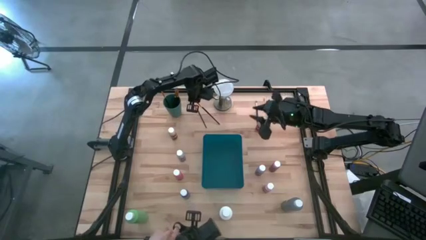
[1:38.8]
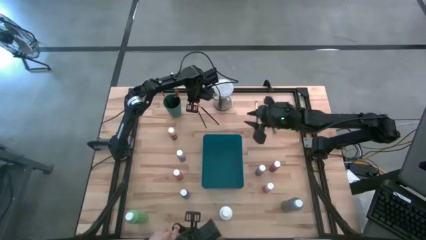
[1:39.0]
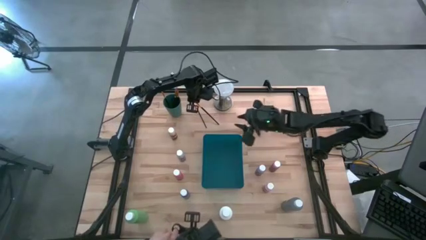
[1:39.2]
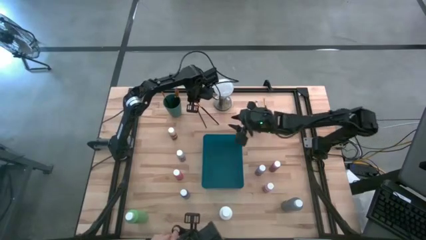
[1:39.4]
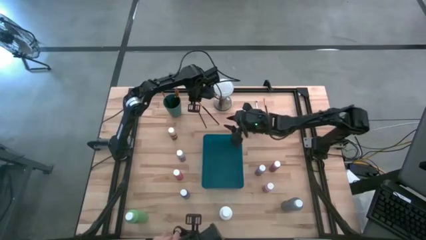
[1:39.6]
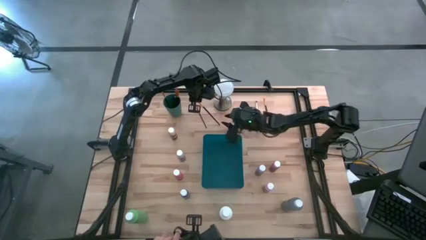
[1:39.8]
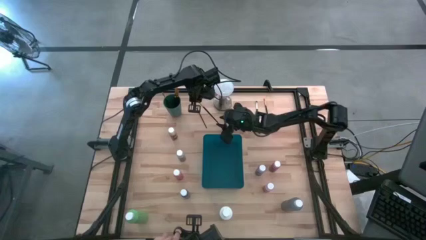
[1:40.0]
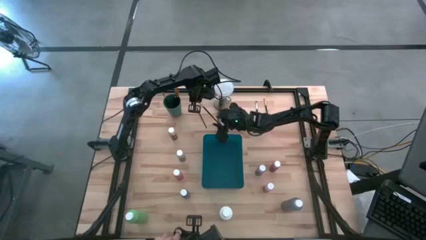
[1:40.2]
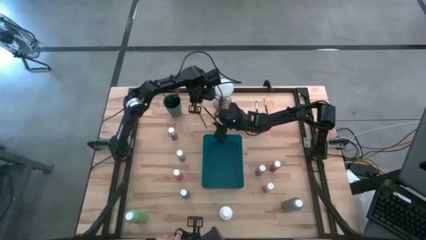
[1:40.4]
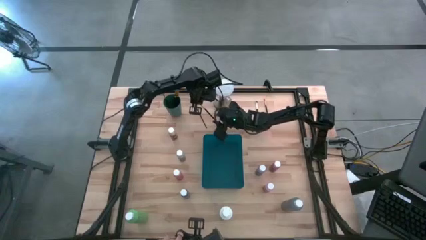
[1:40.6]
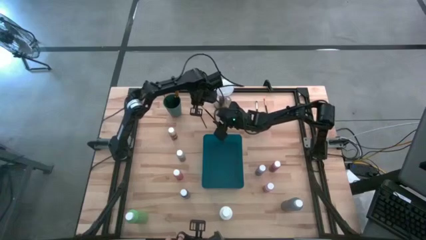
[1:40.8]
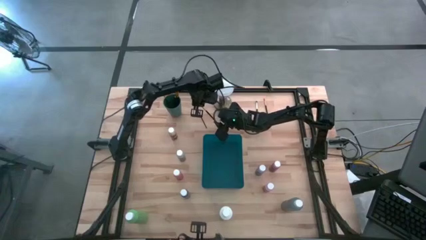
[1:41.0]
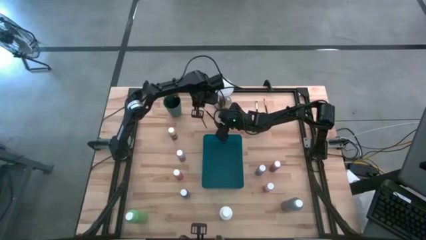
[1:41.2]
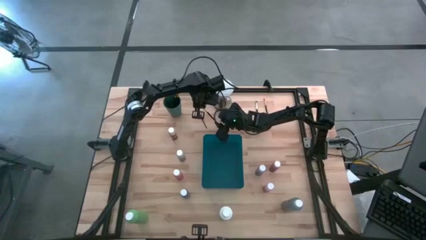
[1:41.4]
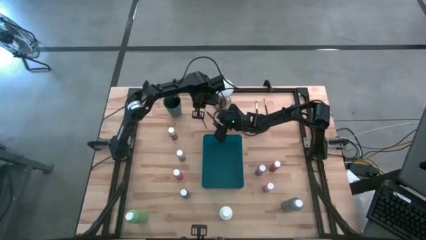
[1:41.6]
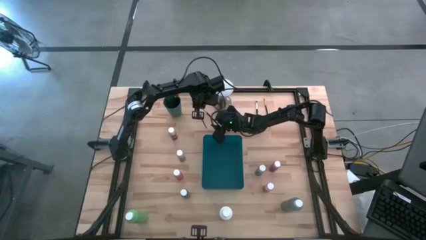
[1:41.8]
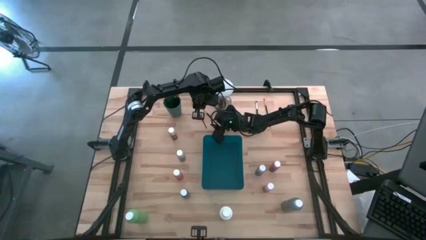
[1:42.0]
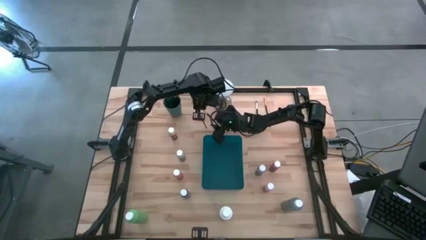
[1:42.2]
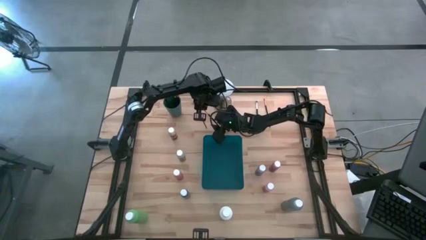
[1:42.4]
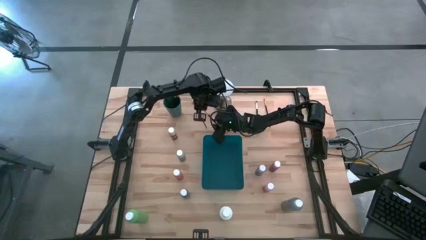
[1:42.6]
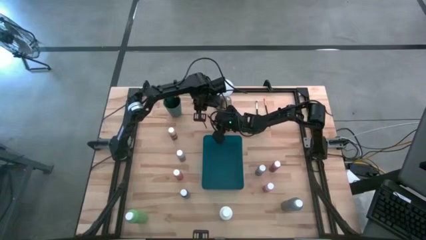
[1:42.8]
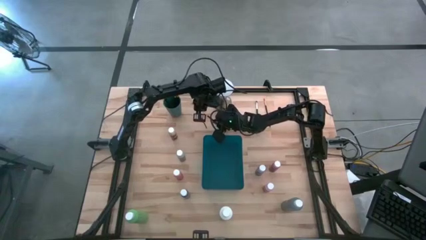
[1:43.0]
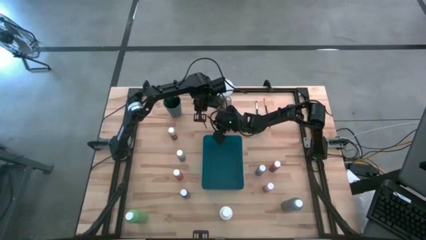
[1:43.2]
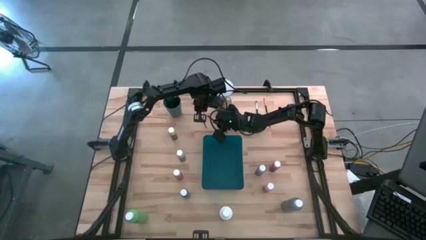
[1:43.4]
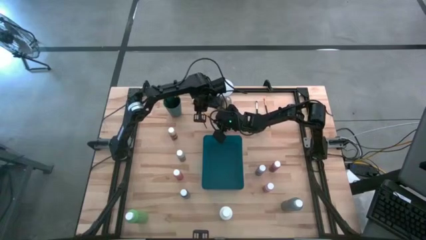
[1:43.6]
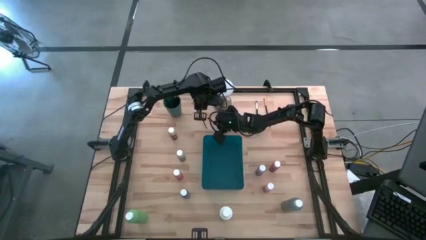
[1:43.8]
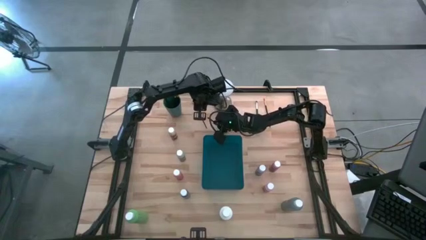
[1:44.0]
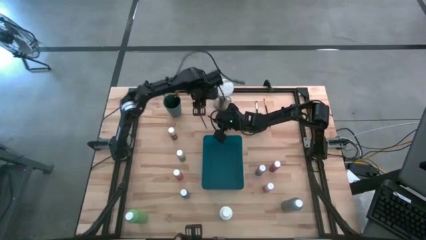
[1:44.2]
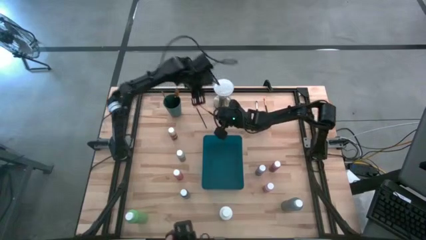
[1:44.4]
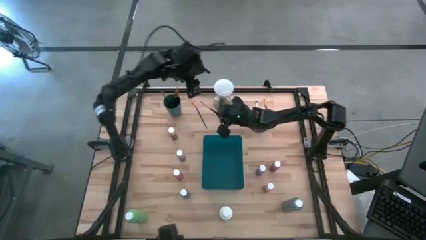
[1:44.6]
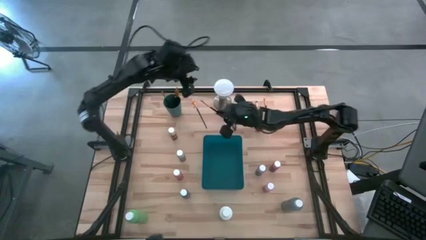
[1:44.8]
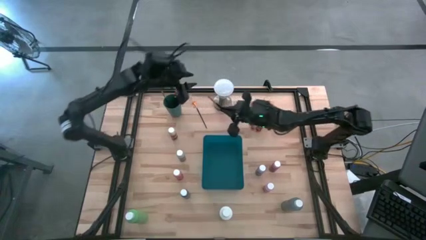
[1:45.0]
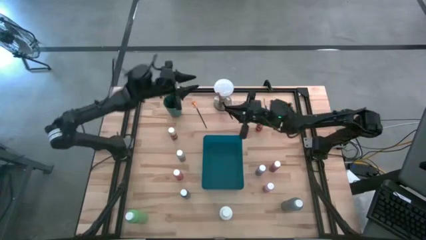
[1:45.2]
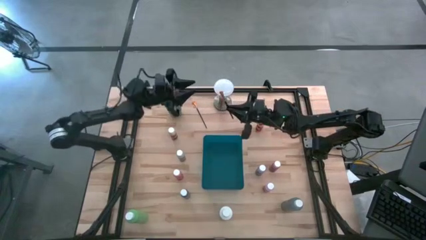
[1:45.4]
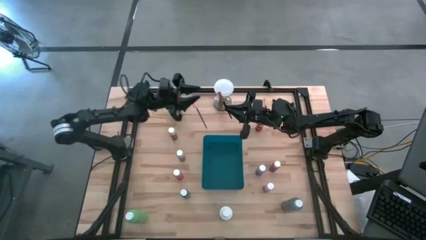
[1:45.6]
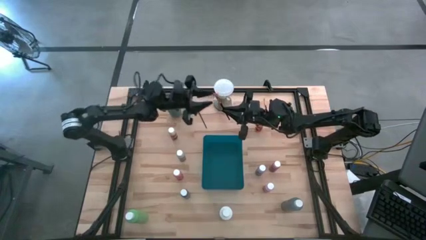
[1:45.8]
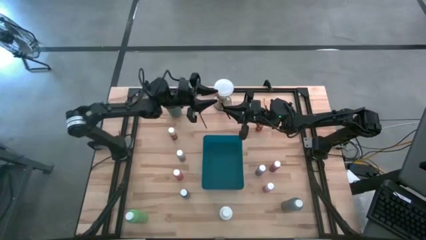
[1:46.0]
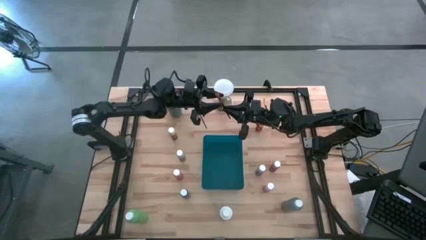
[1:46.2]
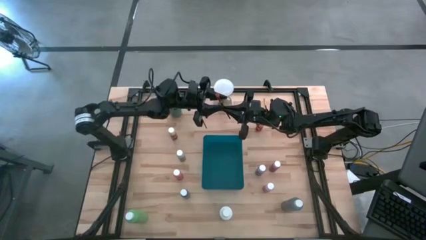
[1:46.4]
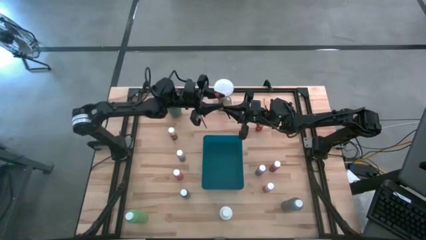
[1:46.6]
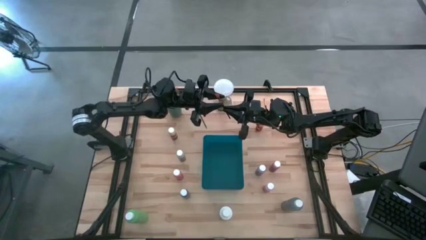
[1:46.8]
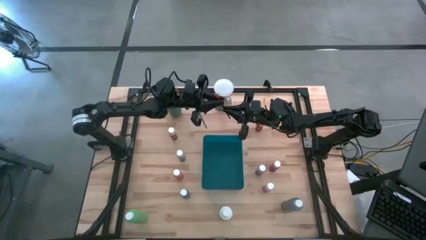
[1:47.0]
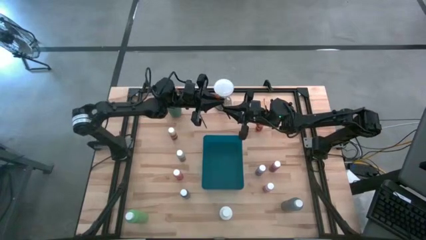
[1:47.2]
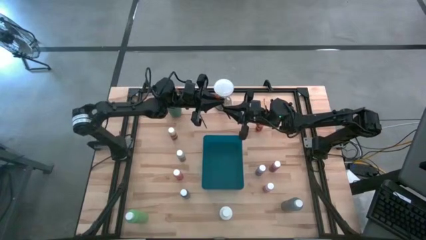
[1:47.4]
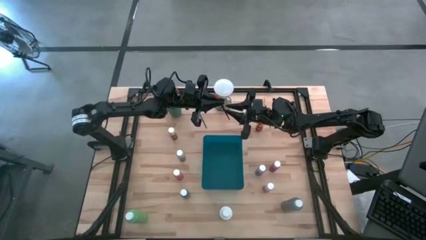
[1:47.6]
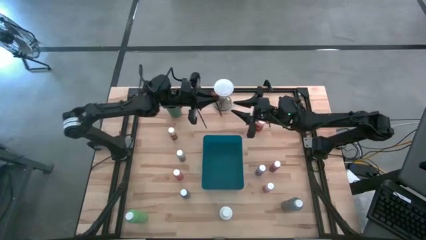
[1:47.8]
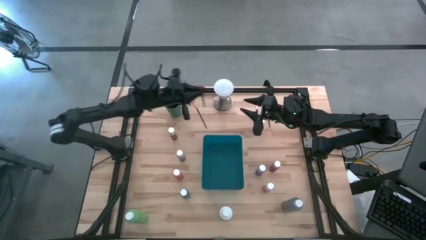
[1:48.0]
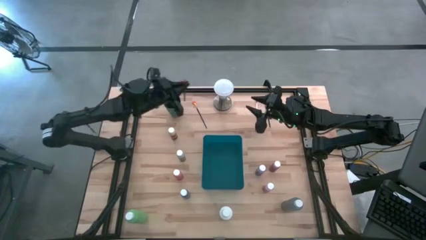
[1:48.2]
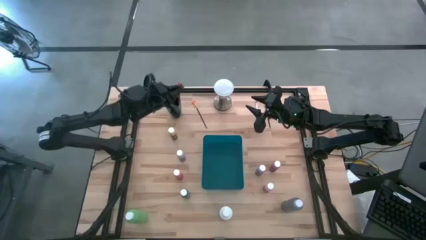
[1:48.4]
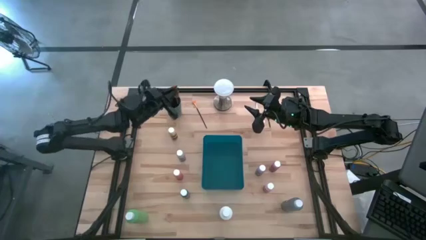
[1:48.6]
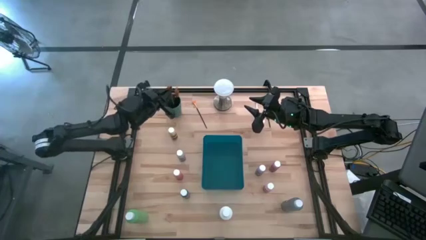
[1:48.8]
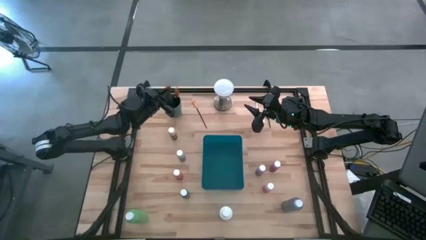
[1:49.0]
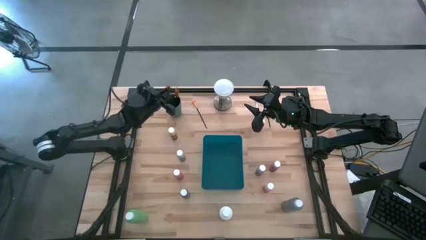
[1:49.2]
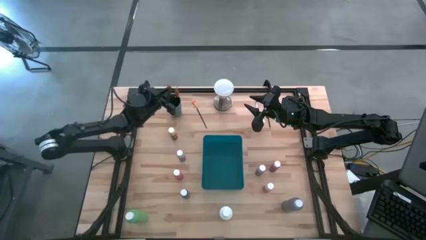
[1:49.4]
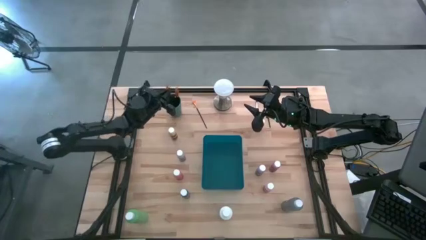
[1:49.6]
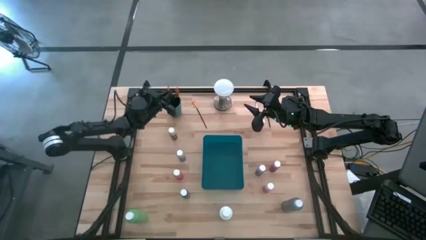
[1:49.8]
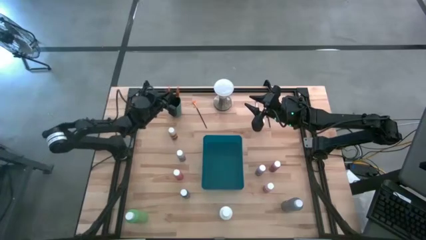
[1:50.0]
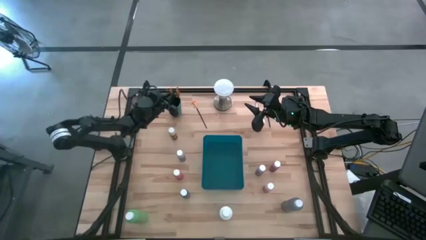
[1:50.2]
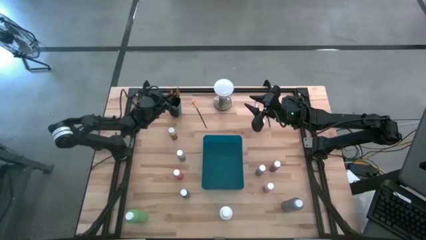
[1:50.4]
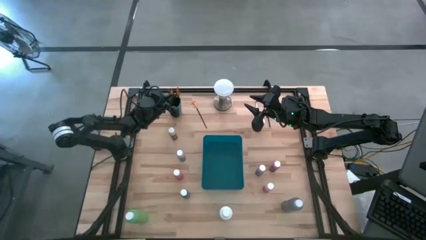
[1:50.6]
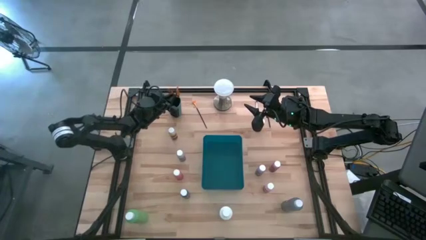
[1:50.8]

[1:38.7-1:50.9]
Task: Pick & Place Paint Supplies
Put the yellow paint brush into the green cup

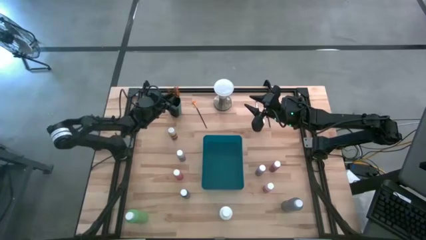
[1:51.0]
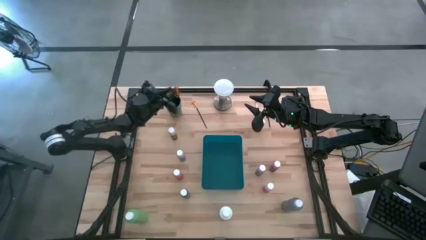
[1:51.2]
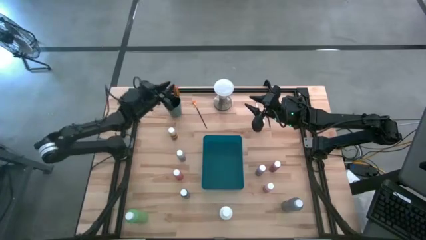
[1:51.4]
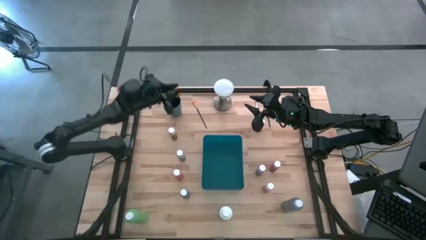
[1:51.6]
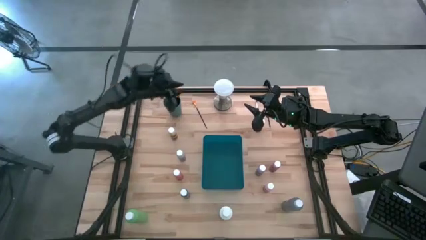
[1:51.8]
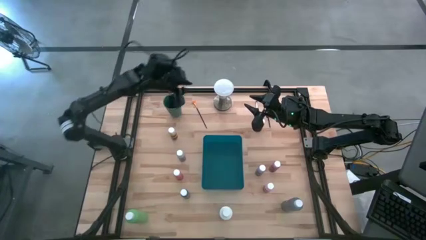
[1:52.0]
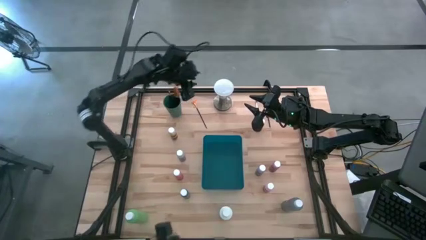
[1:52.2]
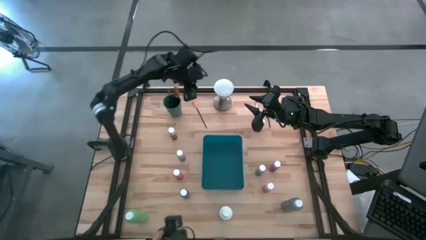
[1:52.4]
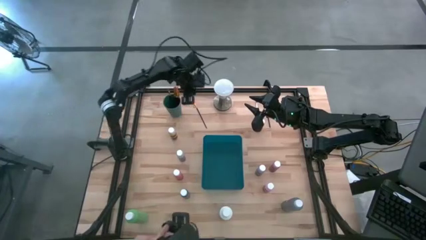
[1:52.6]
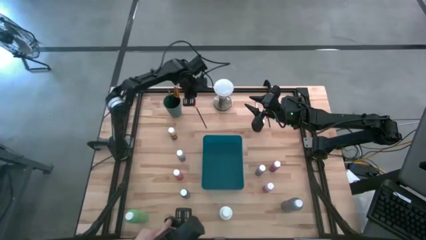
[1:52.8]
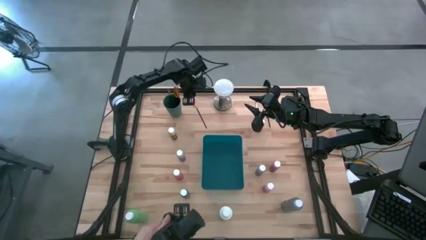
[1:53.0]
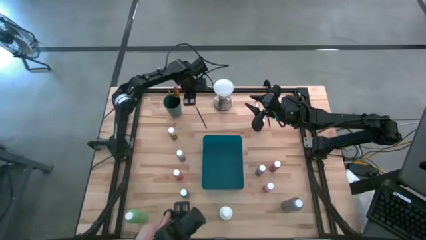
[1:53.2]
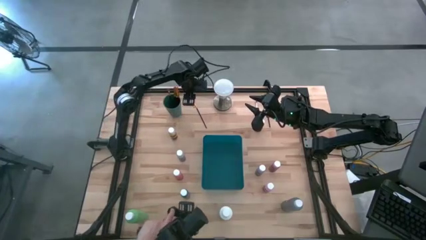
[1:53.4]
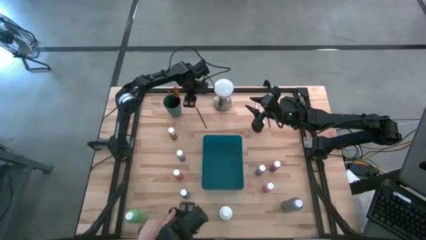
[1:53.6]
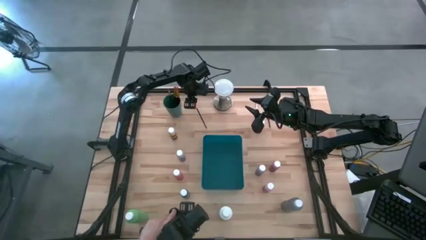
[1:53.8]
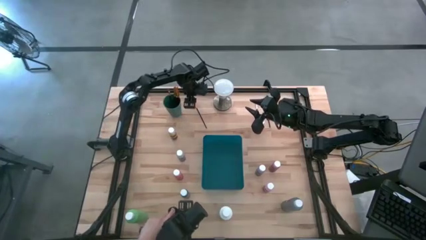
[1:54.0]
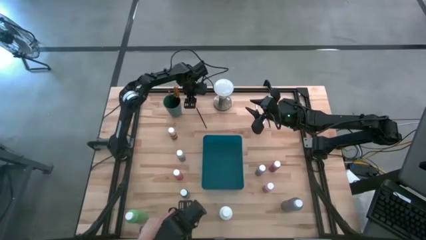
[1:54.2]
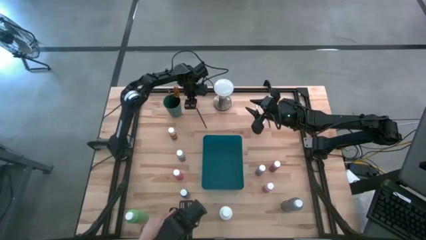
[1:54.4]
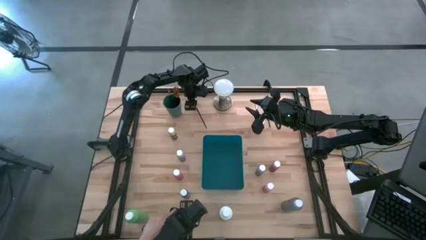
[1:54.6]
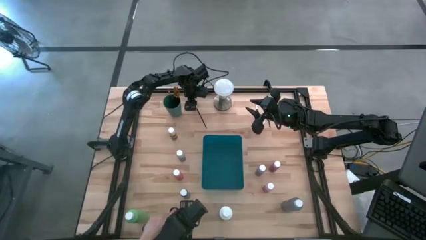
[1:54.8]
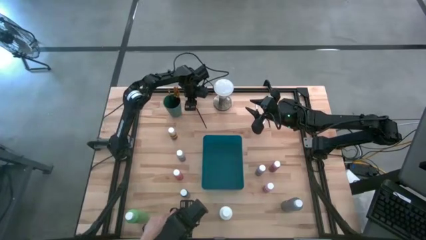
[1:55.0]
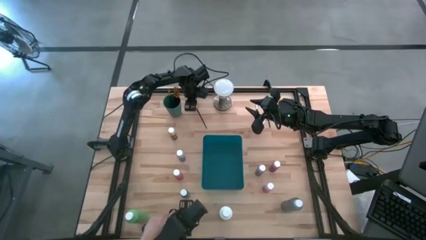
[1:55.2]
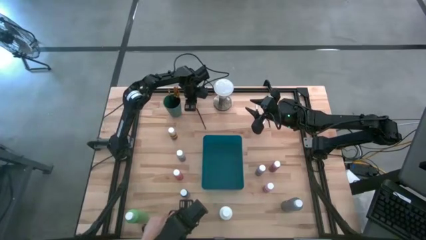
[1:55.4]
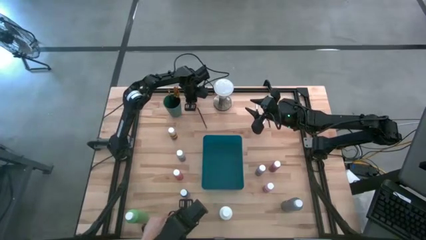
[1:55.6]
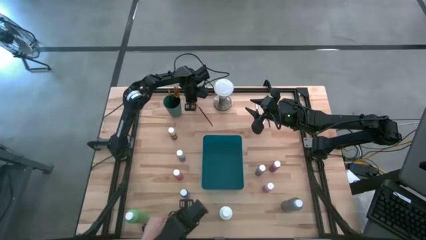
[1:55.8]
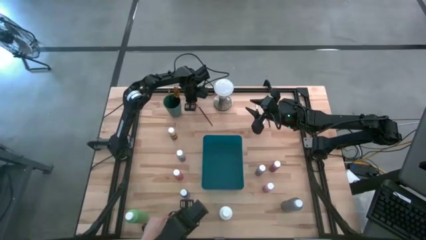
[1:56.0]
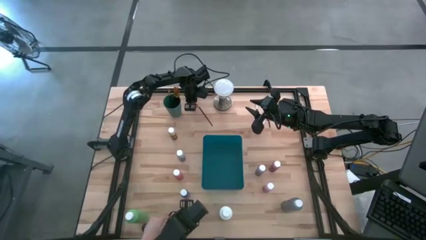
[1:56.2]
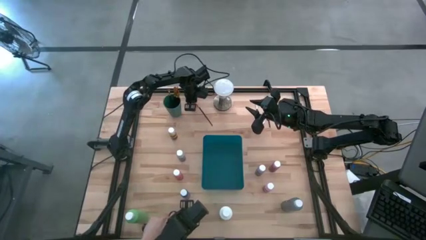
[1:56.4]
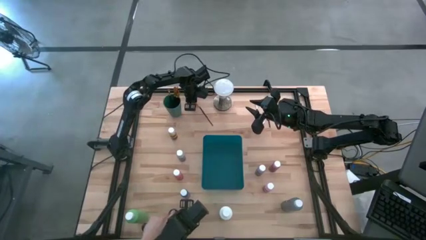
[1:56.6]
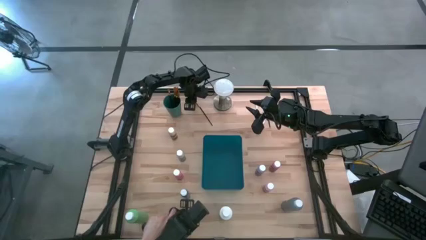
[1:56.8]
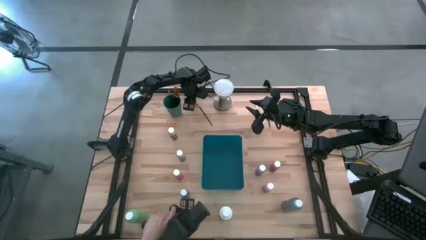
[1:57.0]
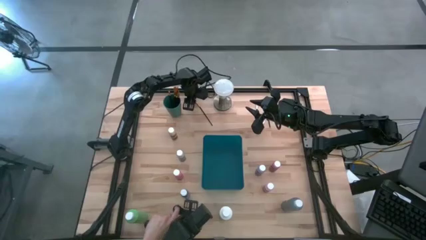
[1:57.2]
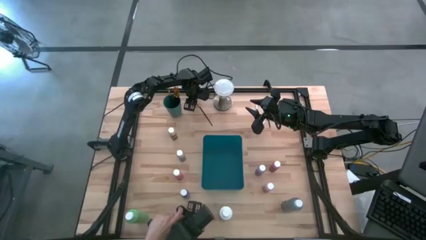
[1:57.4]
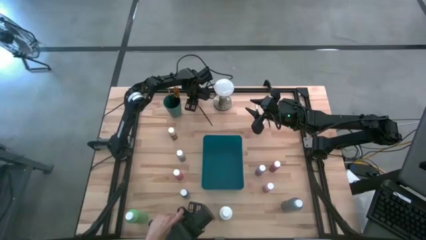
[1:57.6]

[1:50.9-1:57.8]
Put the yellow paint brush into the green cup
